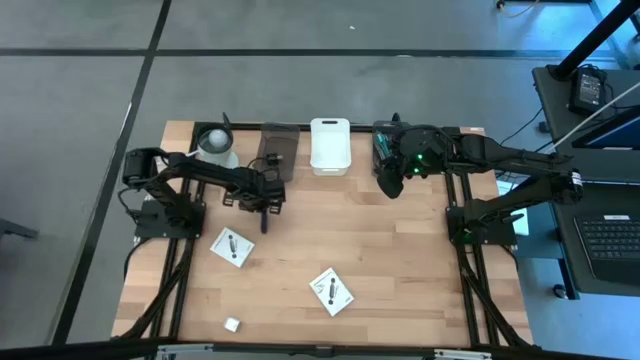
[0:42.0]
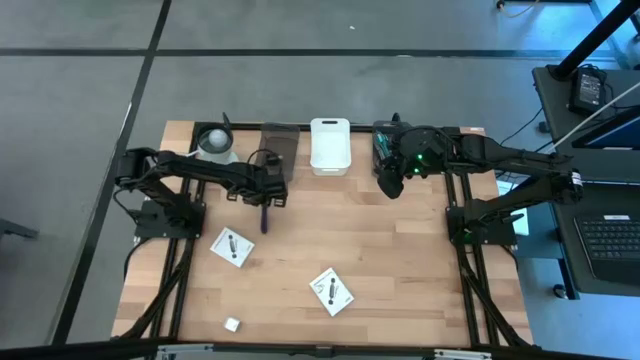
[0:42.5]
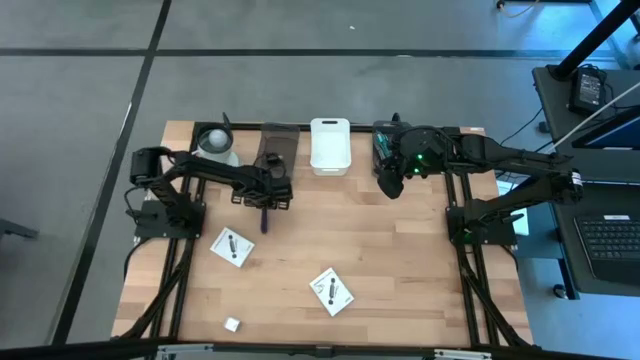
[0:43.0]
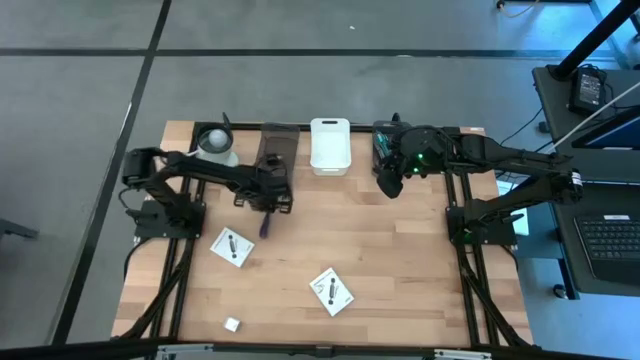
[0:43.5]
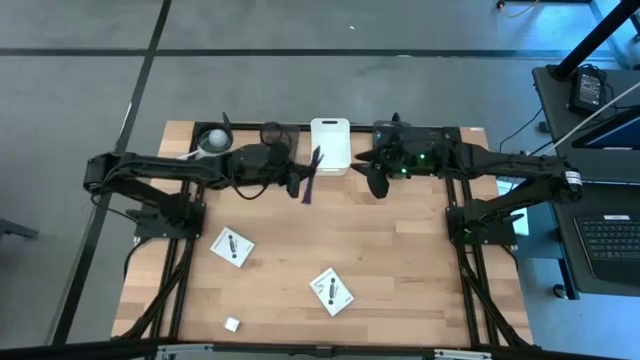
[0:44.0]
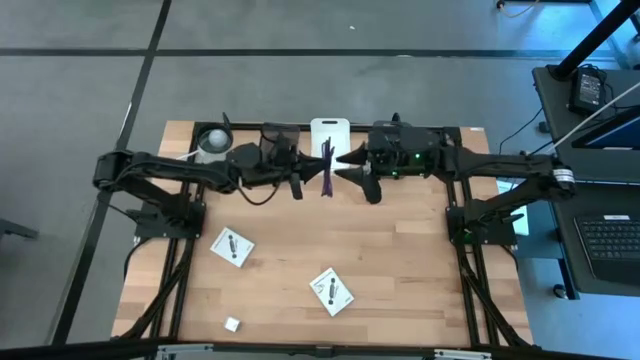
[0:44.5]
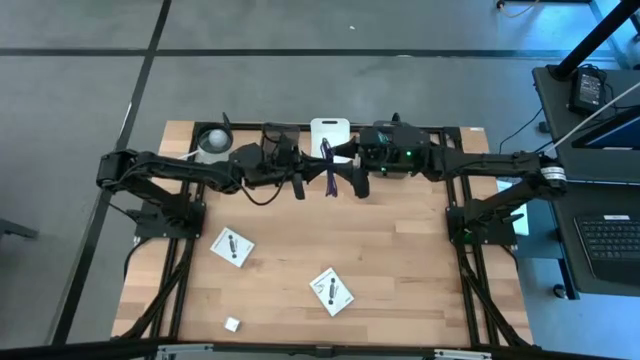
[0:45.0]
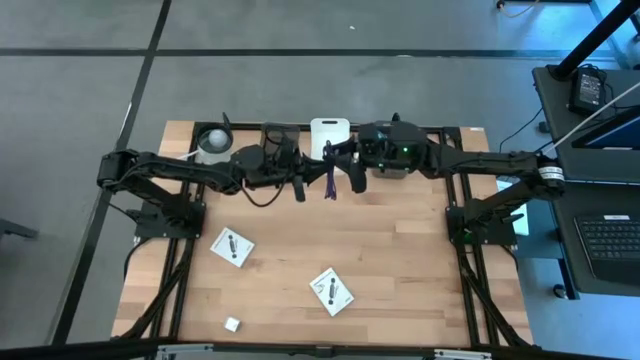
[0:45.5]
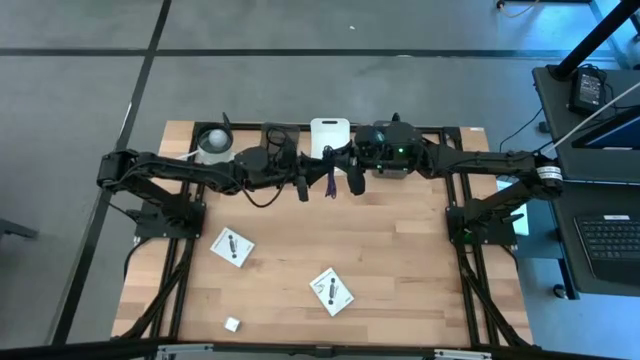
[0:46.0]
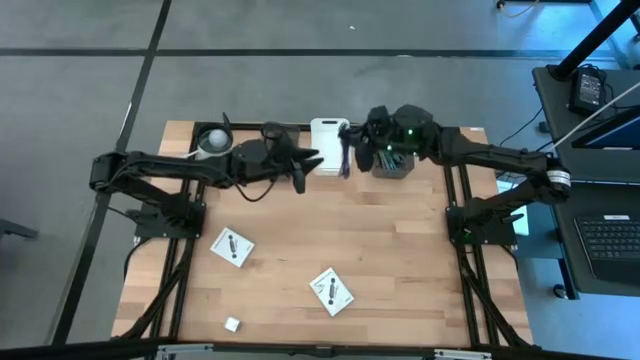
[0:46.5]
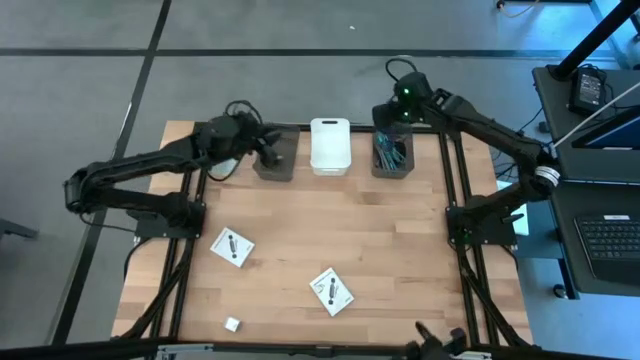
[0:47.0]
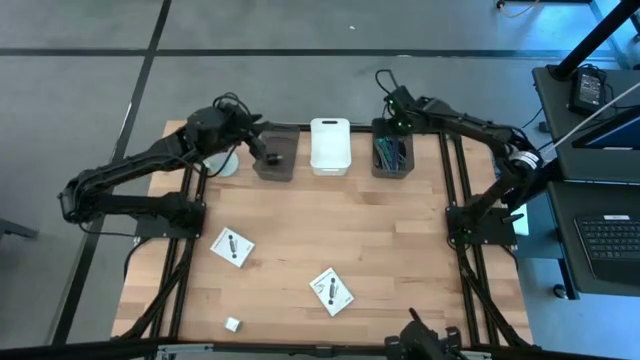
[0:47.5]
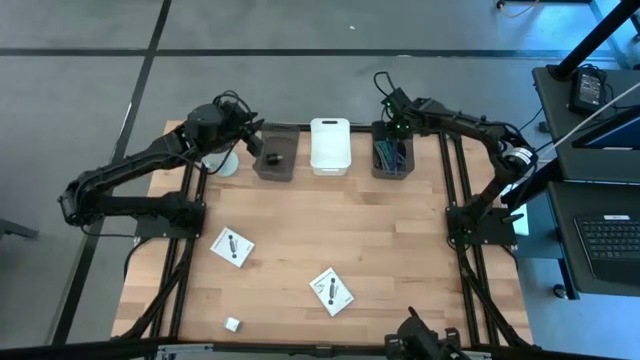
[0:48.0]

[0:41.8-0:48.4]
Task: Pick and place items into bin
Put the purple charger cable into the right black bin

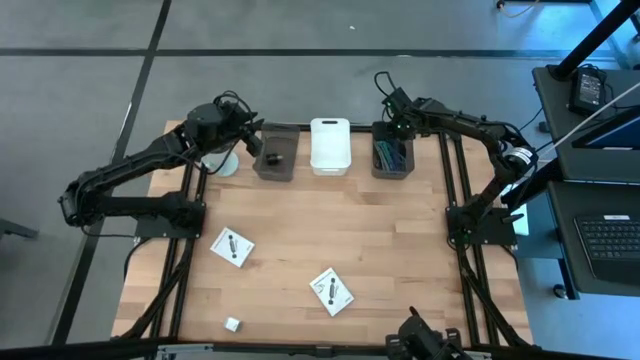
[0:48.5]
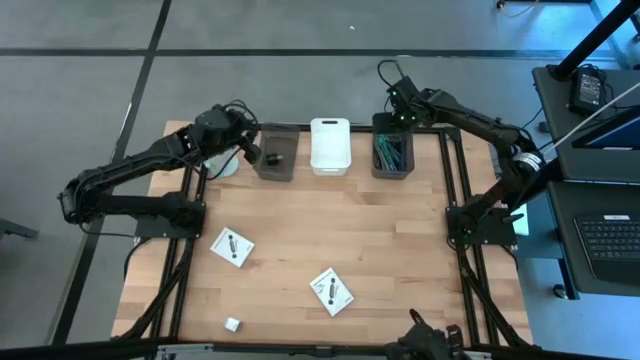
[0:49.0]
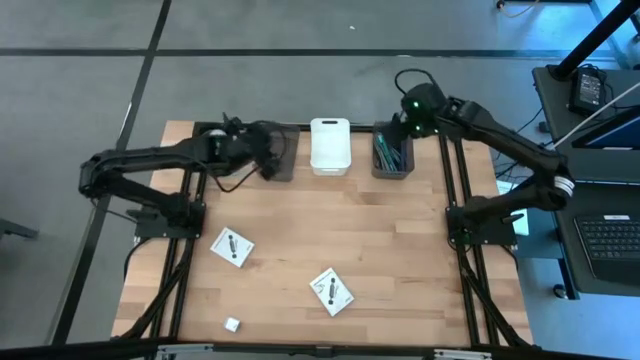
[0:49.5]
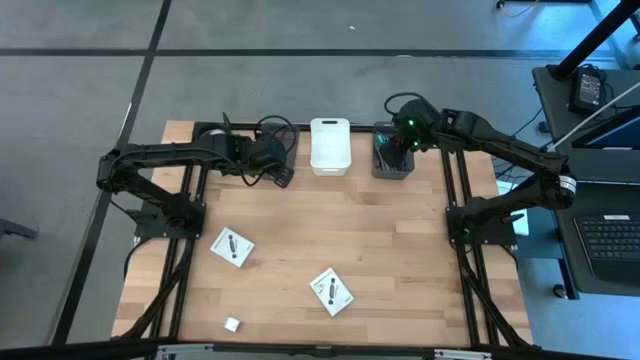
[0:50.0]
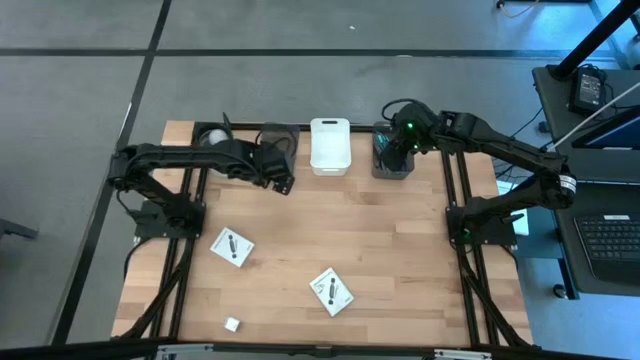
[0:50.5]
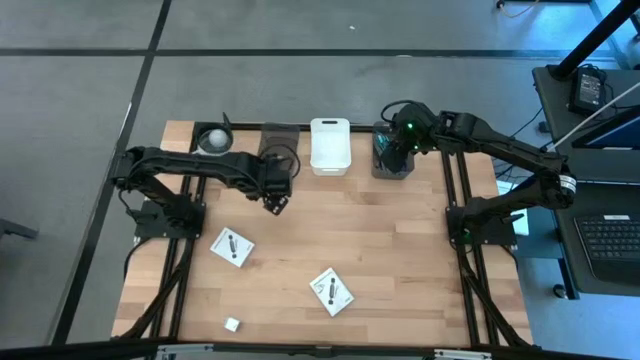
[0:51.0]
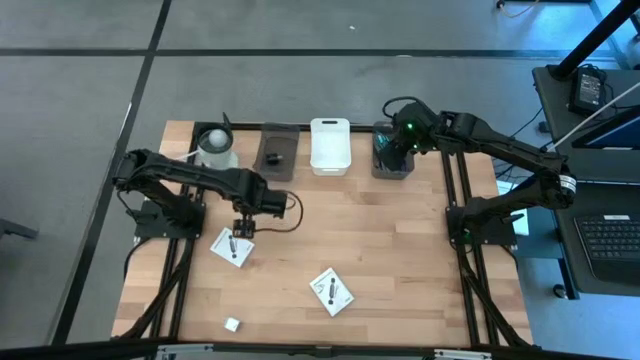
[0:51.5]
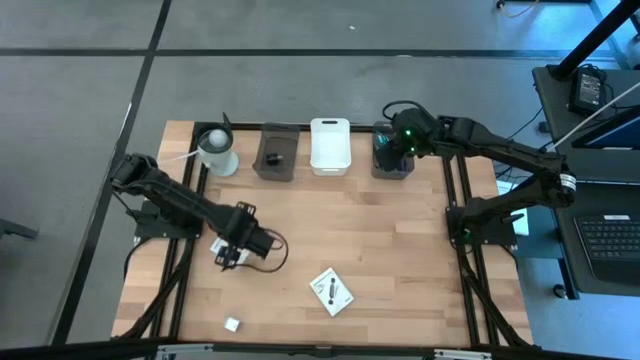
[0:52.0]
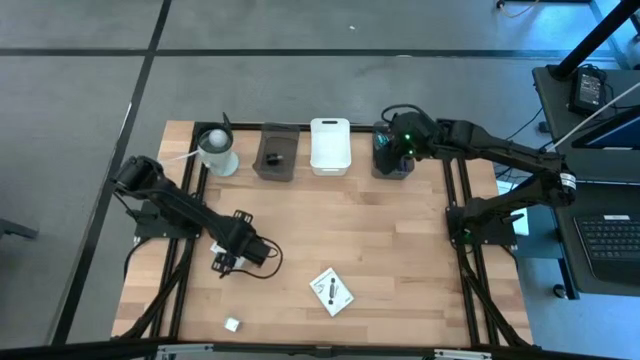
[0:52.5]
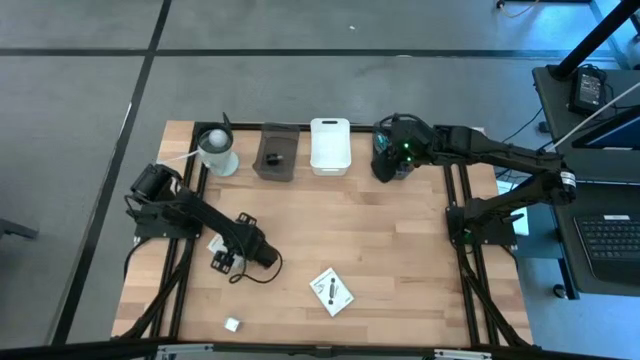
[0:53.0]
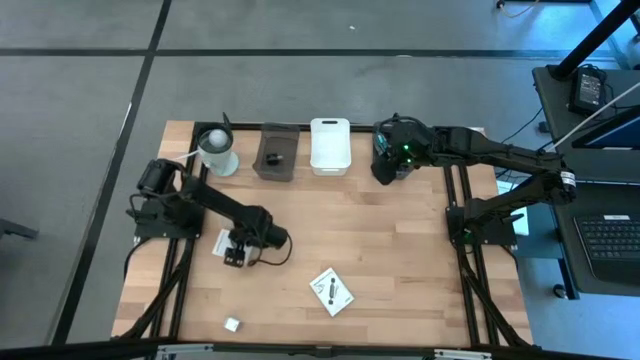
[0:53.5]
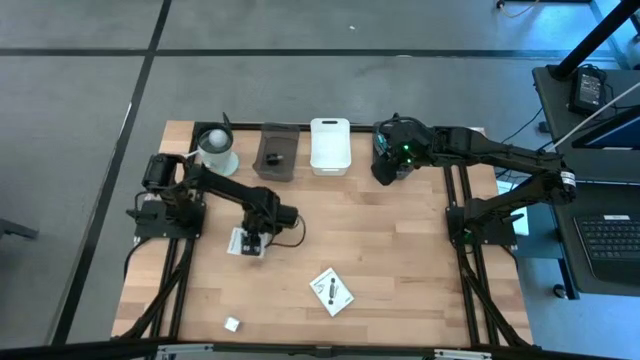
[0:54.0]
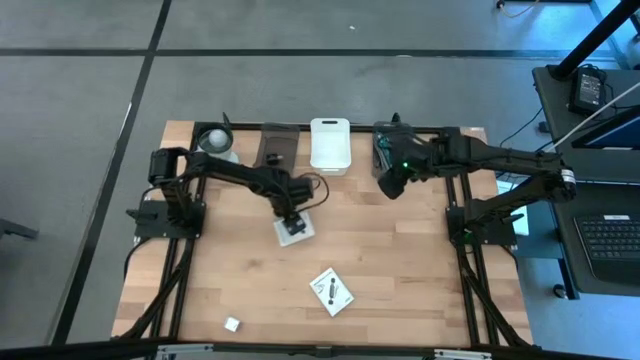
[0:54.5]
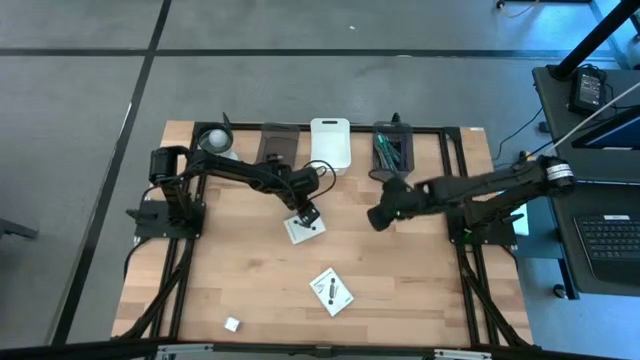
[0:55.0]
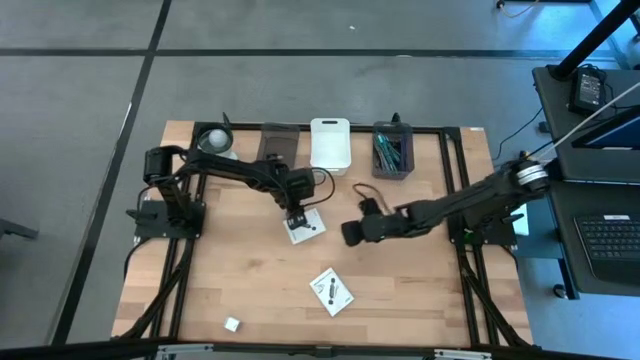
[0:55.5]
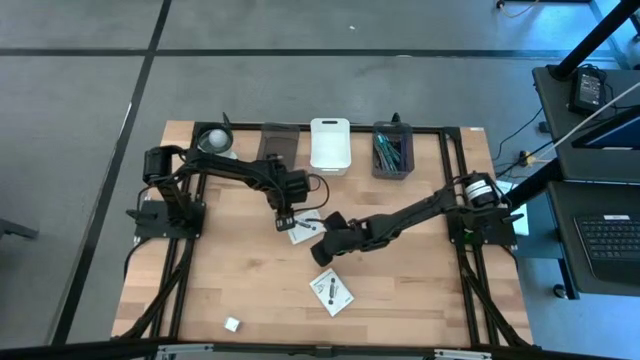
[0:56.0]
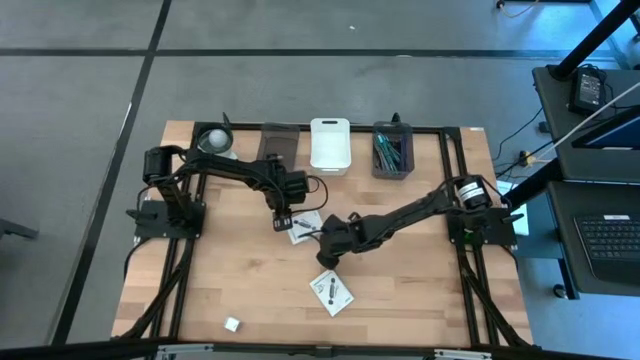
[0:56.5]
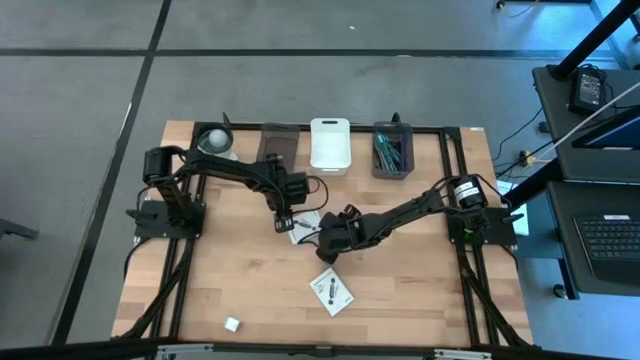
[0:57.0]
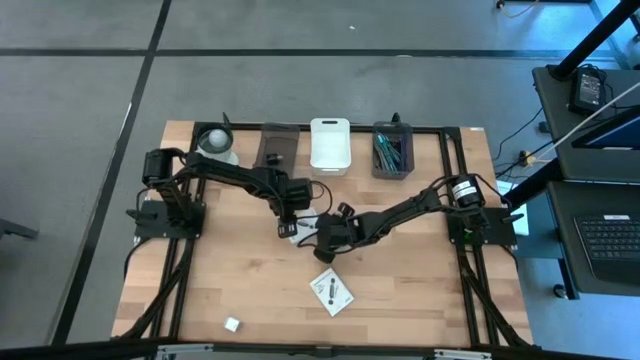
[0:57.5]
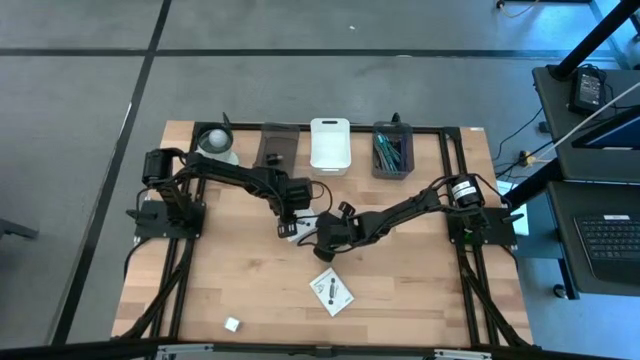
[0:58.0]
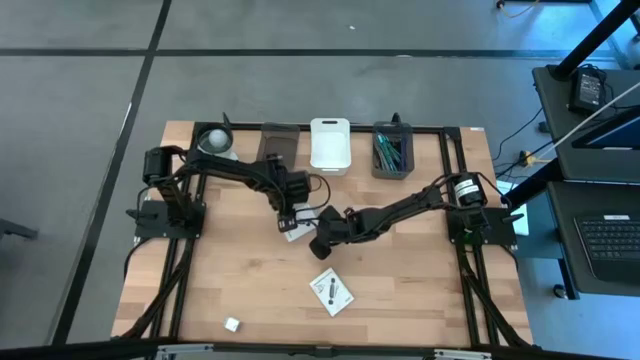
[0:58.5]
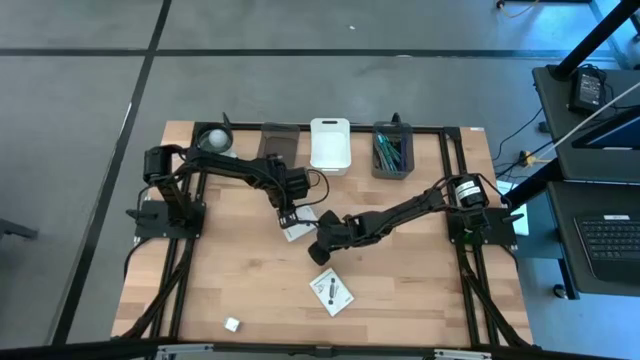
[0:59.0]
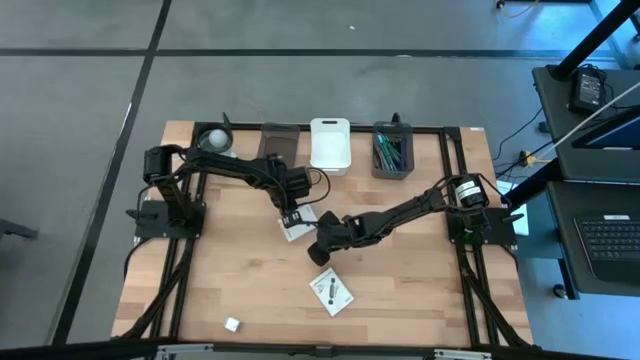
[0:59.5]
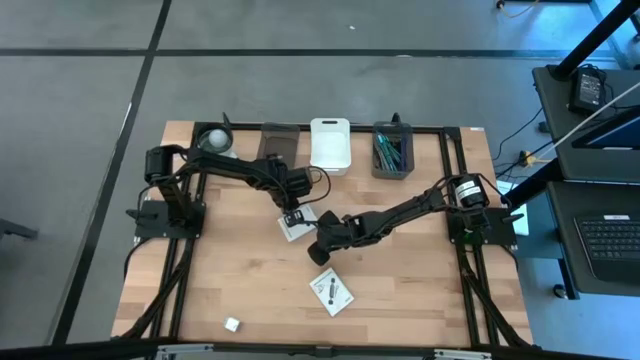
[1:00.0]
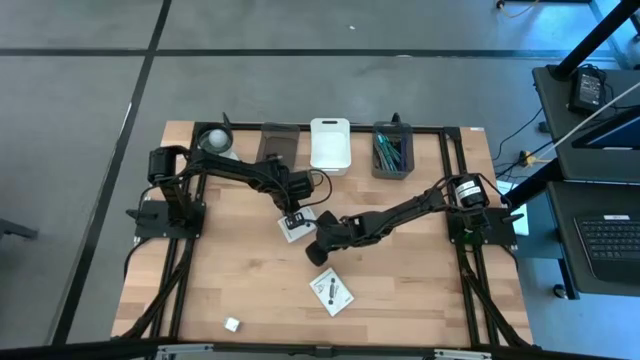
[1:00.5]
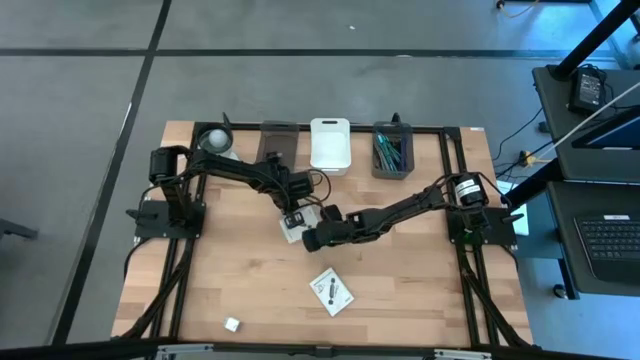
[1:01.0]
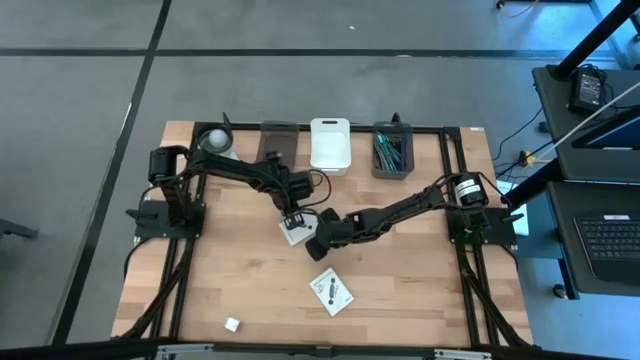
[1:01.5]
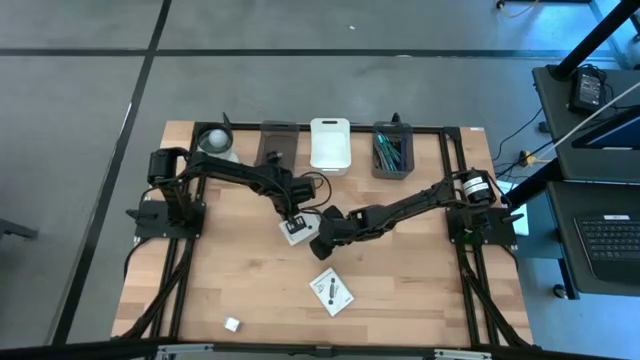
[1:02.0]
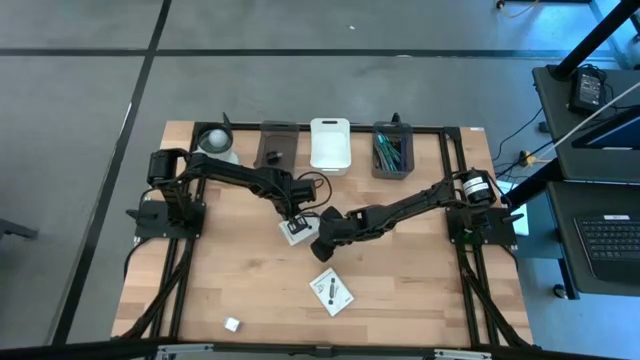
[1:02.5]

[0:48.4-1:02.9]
Put the left white card reader box into the white bin
